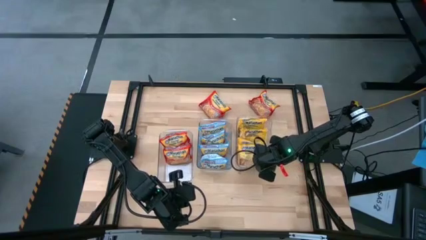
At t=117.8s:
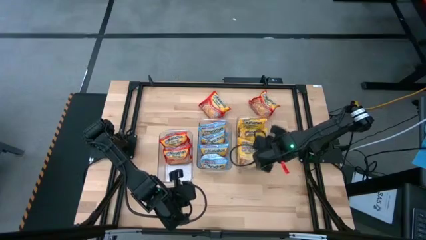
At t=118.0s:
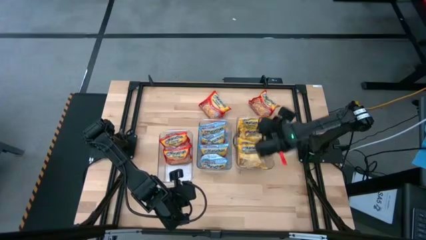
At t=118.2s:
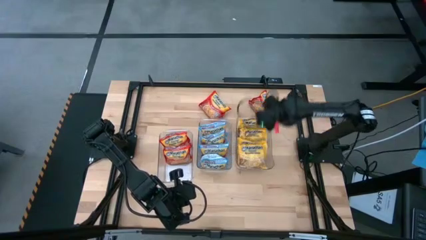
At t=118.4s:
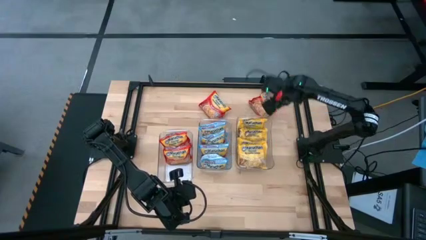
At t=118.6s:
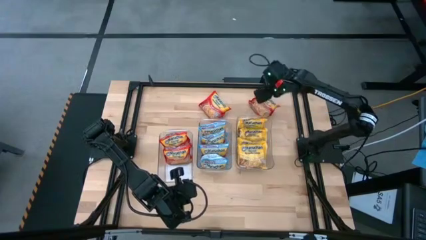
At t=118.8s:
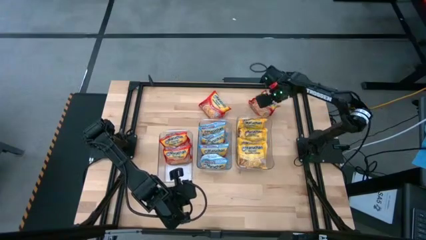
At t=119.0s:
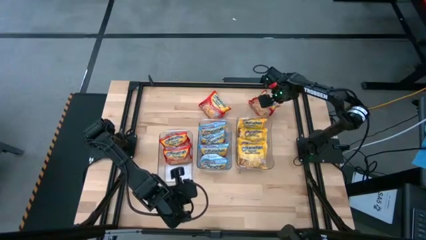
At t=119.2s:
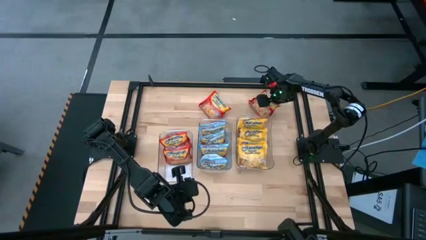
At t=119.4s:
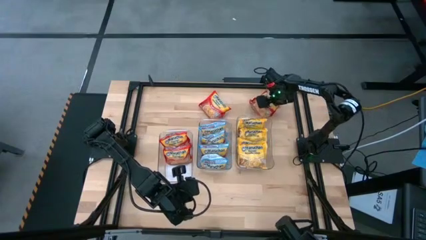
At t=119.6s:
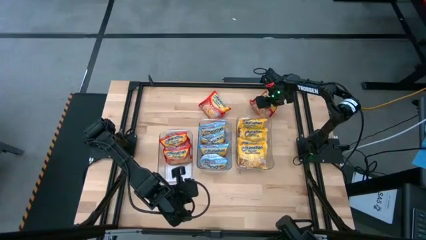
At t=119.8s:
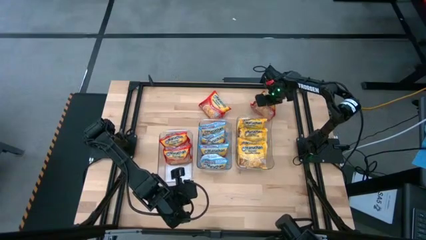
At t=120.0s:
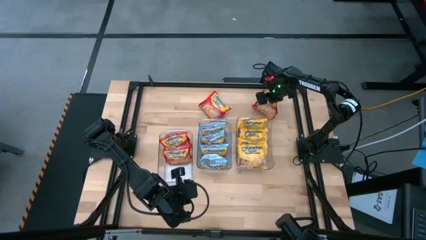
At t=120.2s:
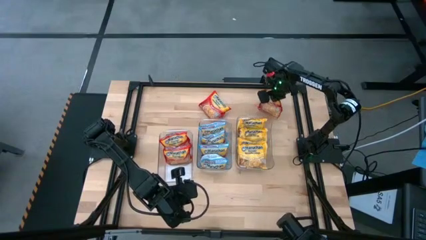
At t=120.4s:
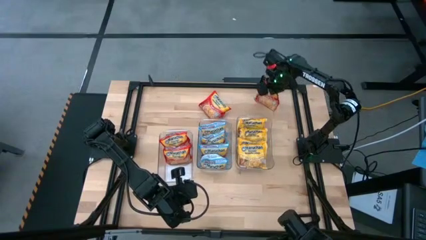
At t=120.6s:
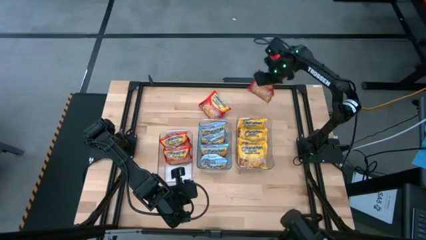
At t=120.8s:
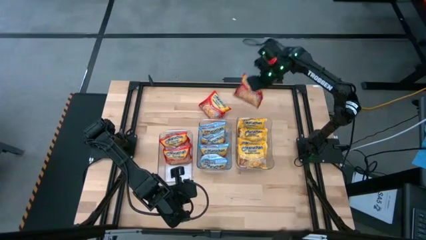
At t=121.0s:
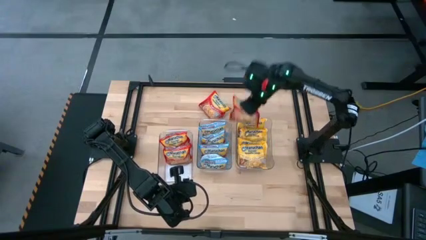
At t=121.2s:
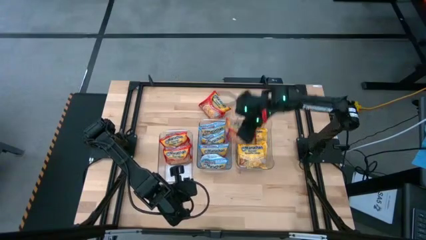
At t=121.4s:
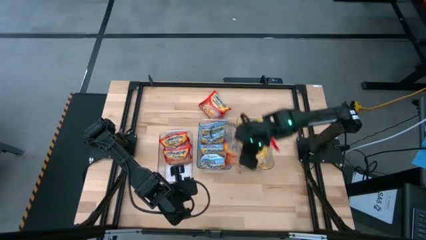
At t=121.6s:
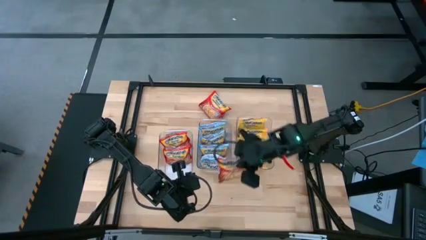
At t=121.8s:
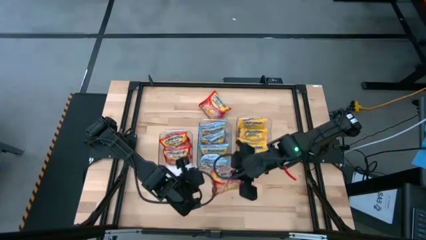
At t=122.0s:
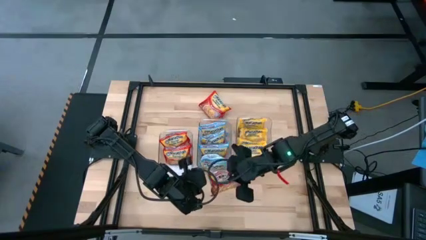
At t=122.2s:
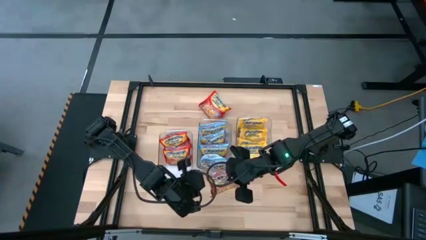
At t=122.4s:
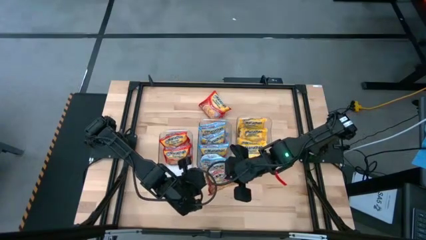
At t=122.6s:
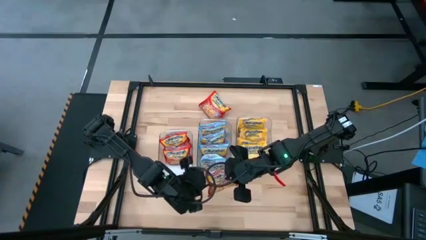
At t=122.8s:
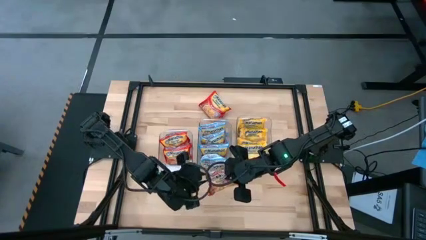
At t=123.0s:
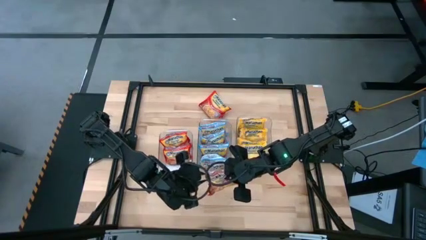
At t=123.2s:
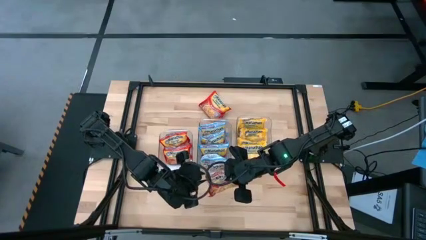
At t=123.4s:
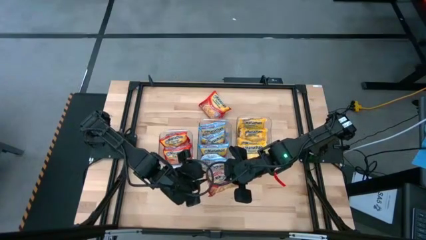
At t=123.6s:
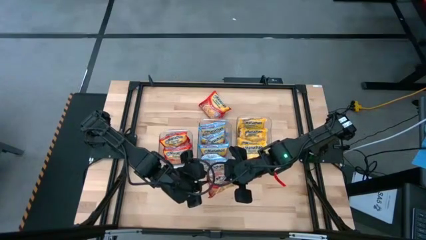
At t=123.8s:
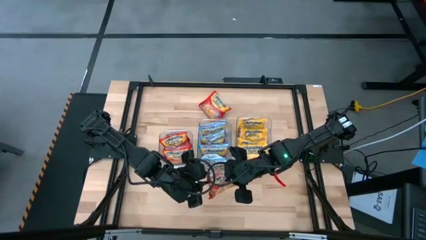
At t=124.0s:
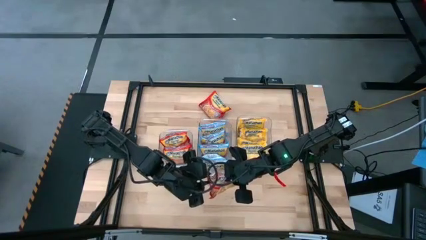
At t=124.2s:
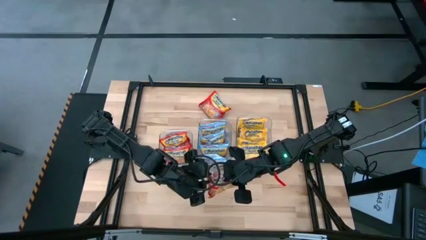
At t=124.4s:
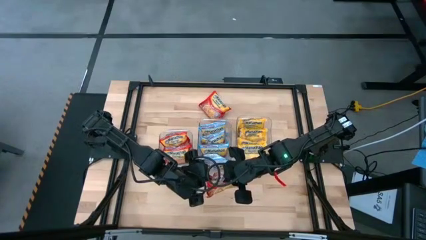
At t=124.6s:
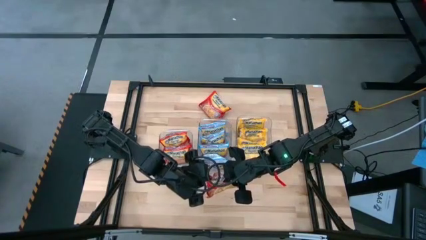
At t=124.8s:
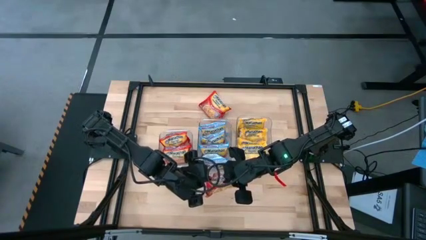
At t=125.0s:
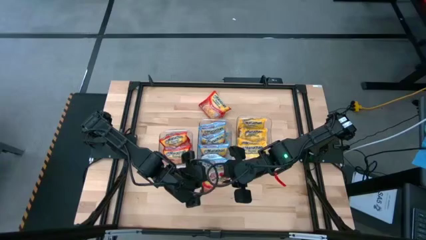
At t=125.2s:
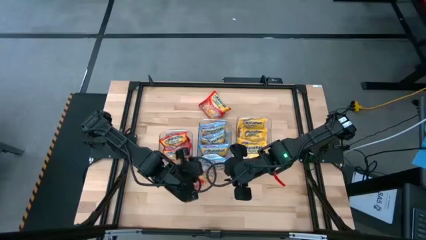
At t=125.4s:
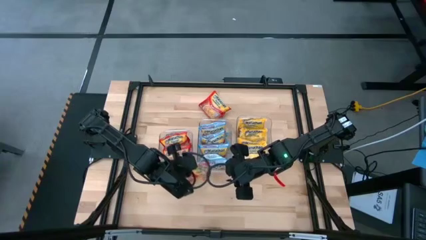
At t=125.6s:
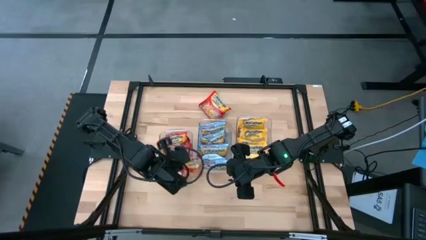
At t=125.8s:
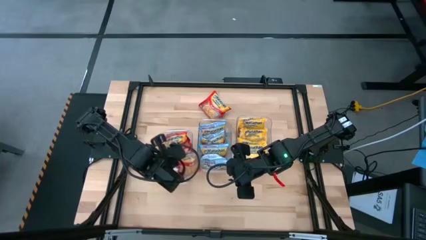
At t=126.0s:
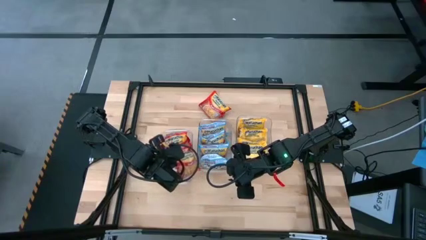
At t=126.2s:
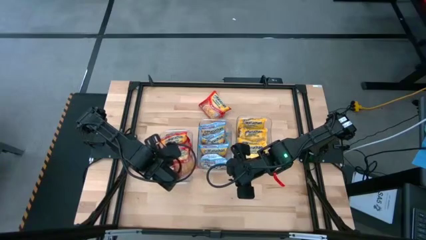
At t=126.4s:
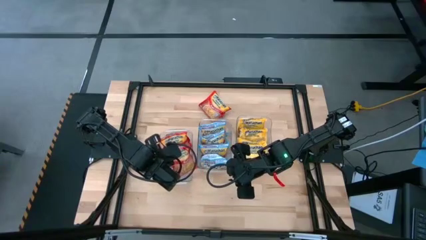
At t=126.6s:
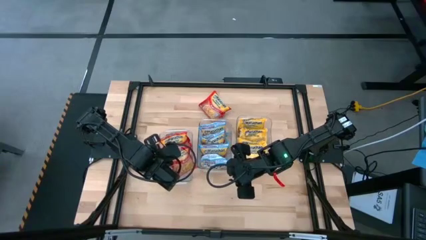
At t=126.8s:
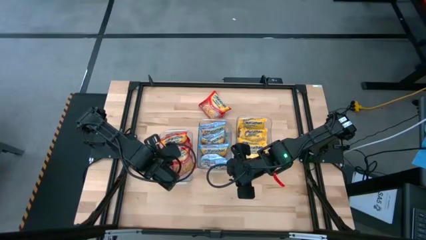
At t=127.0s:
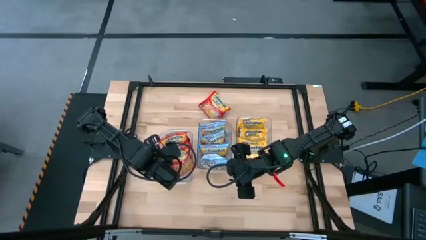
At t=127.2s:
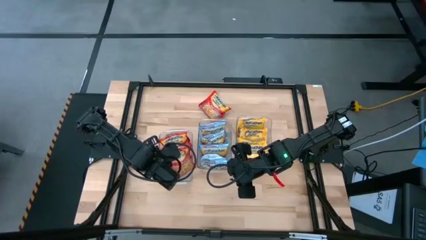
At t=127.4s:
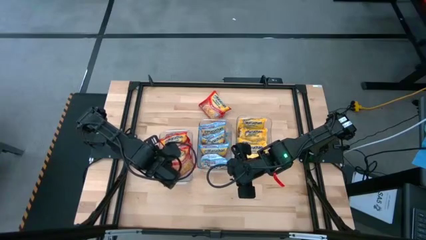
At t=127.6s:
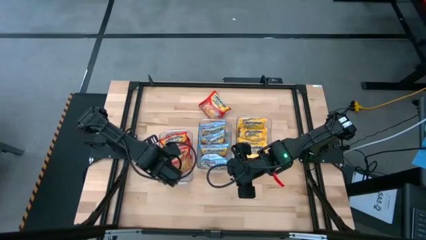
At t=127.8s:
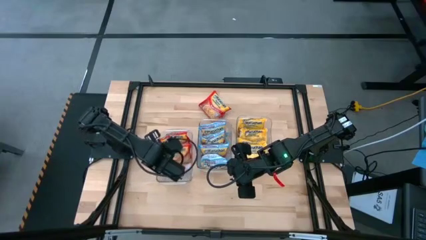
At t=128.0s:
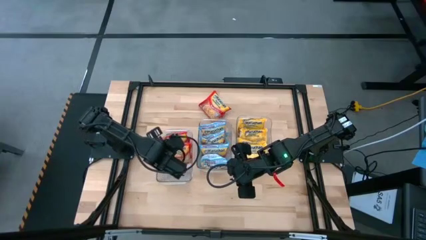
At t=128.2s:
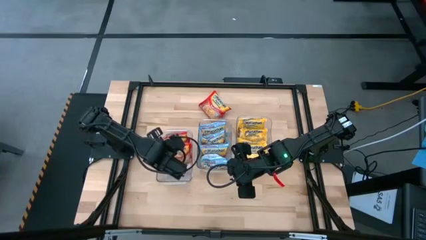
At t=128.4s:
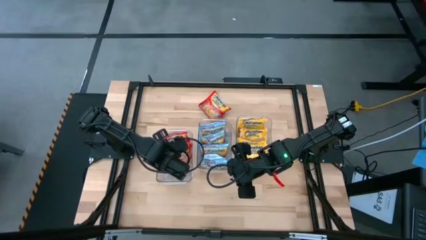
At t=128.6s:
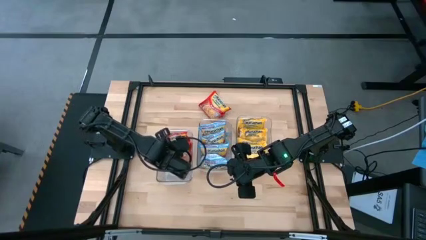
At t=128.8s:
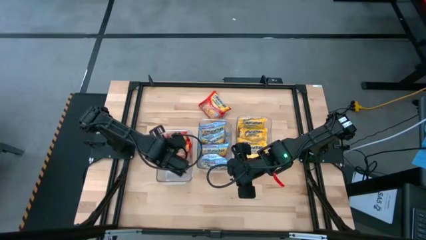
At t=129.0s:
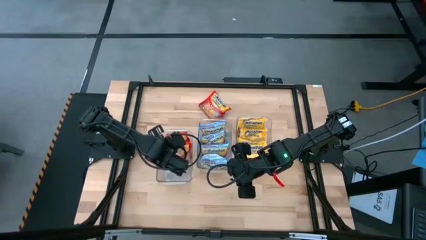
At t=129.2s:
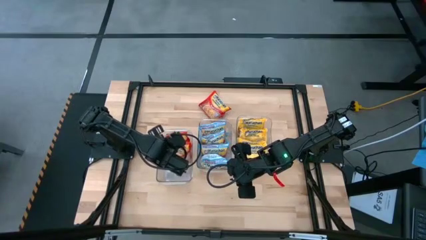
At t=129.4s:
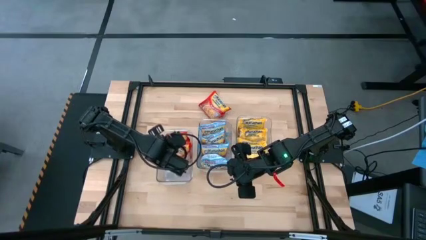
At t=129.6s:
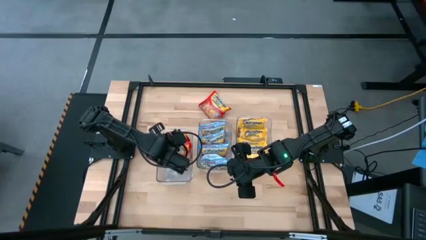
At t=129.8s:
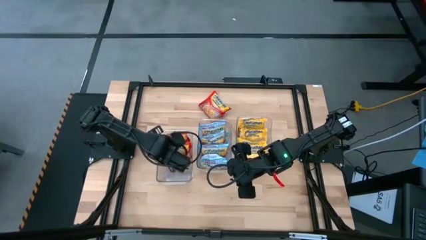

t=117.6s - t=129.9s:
Task: Sort Maruchan noodles
Put the red noodle pack into the left transparent bin

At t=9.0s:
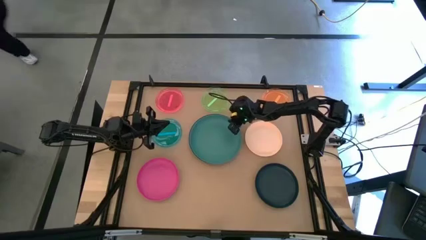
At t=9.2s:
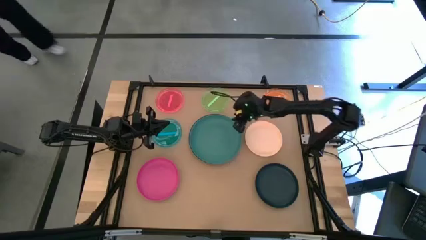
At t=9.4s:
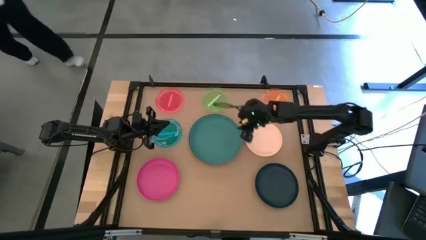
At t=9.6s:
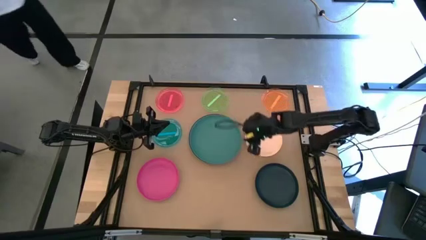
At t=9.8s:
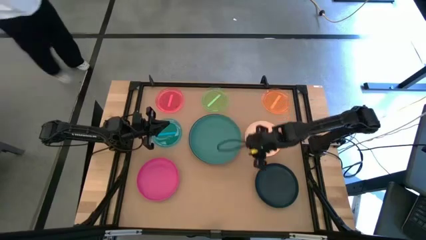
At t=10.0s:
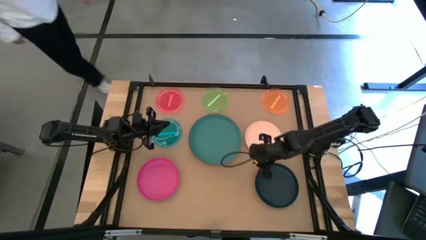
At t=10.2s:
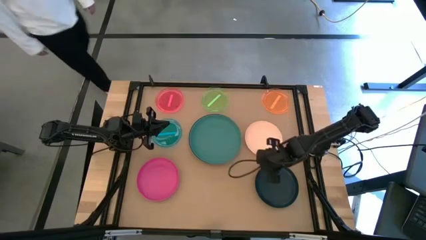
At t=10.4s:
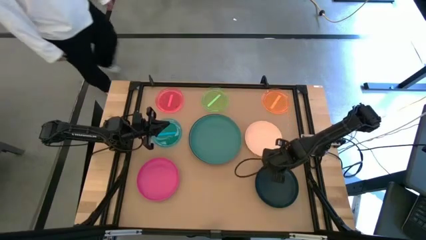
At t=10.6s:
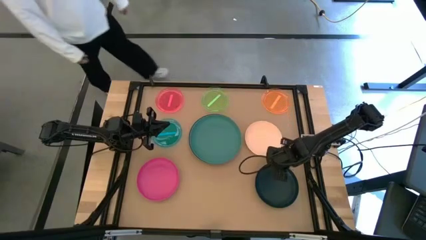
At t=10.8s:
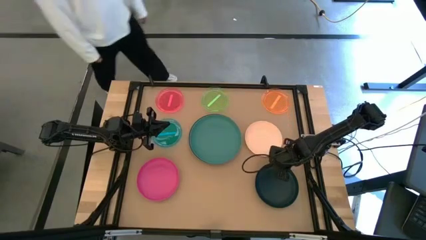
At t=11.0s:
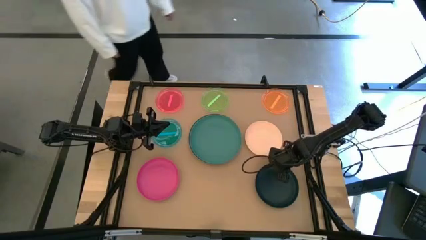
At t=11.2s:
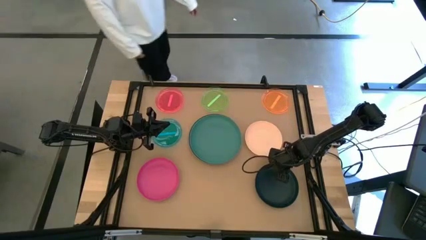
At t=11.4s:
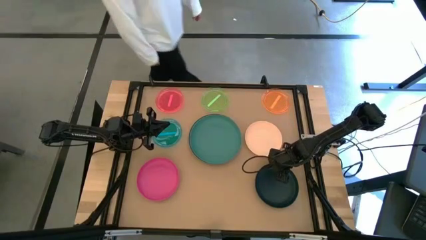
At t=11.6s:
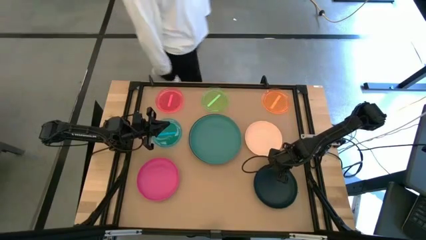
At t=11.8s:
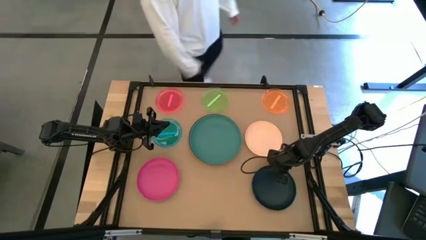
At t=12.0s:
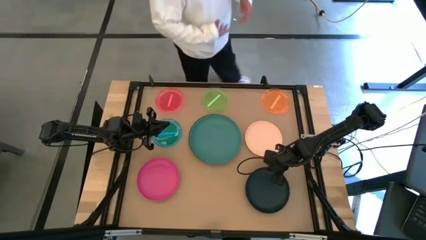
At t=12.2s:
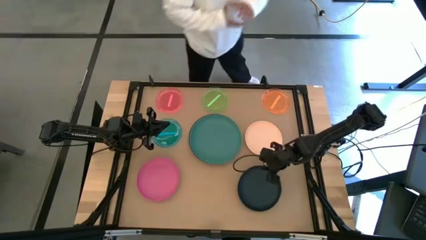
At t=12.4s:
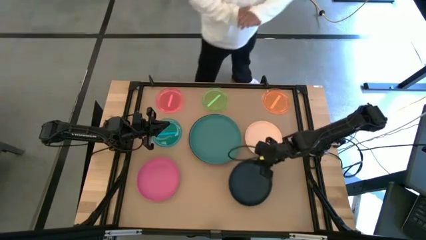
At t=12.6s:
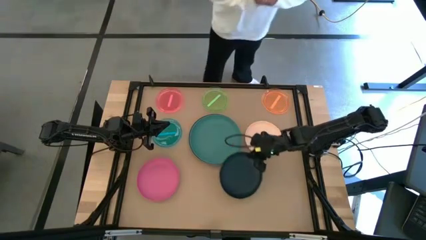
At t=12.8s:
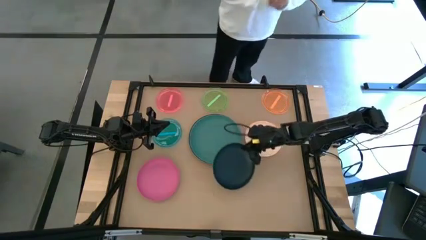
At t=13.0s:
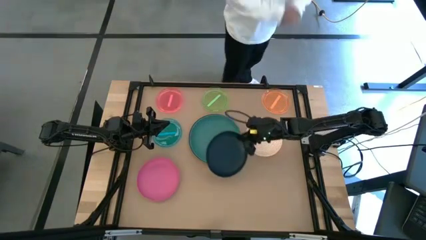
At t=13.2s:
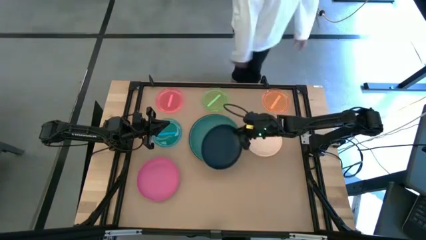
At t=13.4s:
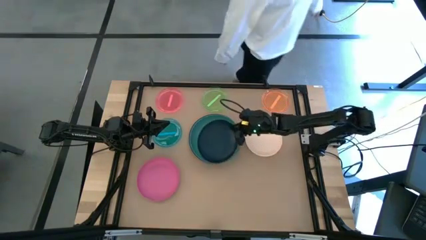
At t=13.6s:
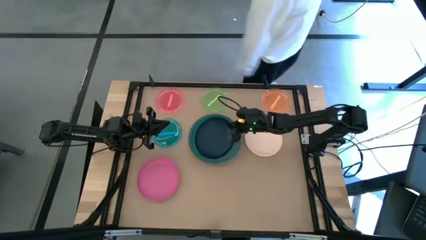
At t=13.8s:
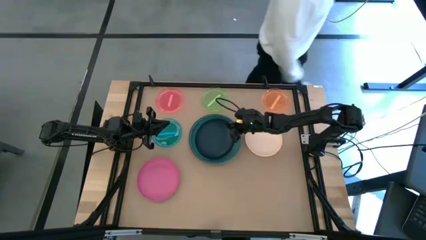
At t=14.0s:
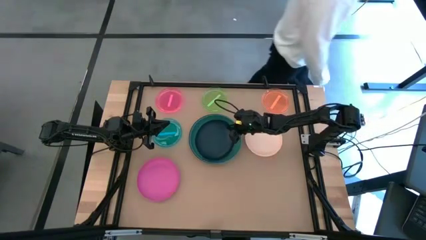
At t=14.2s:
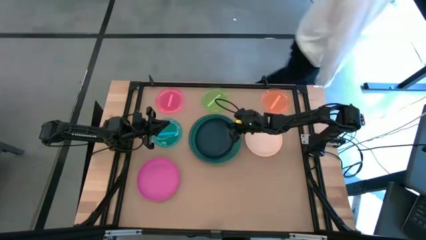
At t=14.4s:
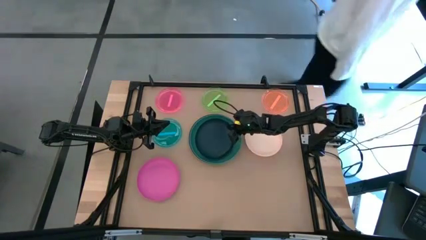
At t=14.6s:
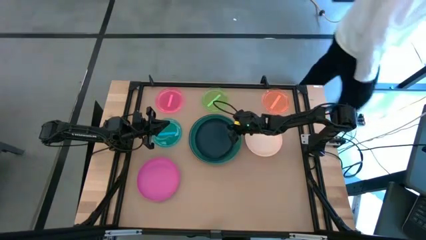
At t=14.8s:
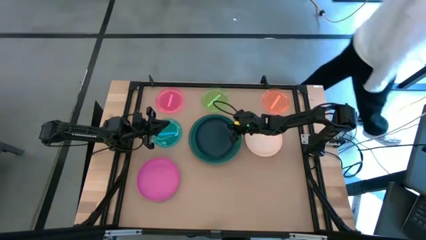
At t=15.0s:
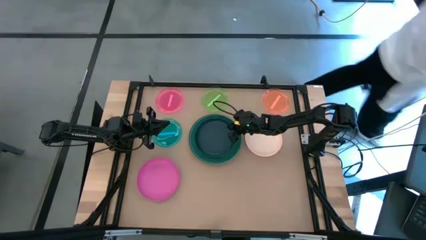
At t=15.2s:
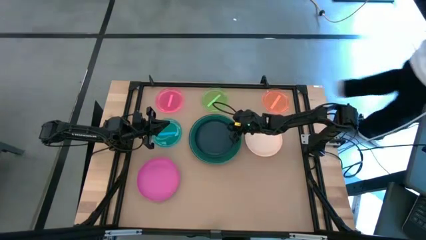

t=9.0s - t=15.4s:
Task: Stack plastic plates
Stack the dark blue plate on top of the green plate
